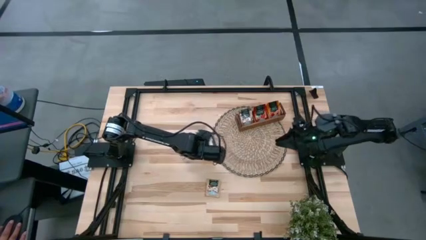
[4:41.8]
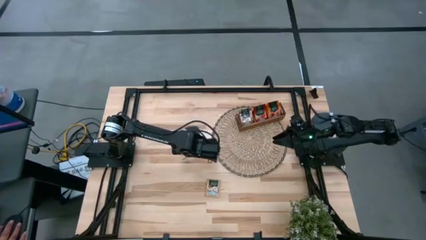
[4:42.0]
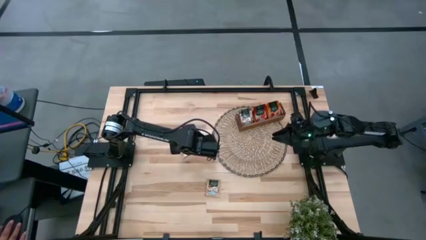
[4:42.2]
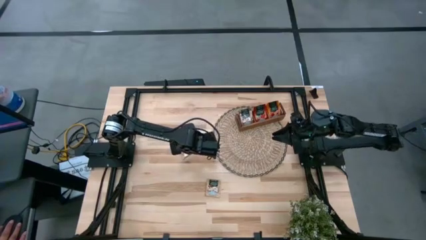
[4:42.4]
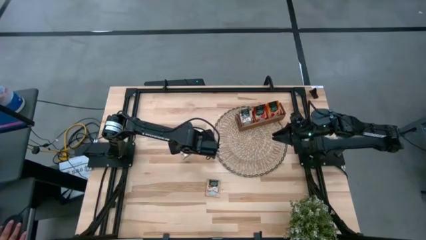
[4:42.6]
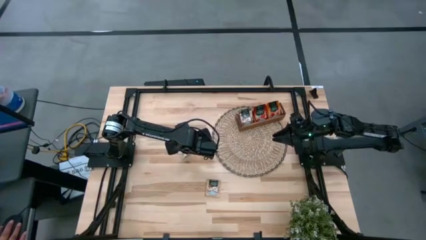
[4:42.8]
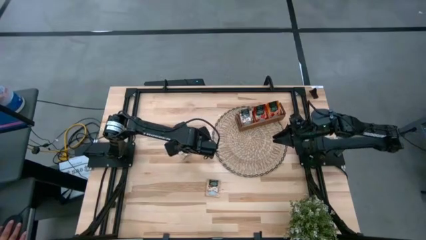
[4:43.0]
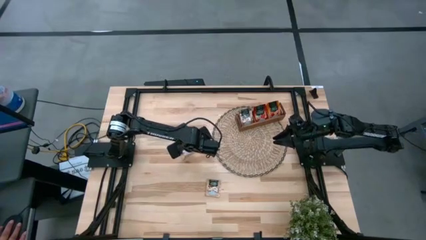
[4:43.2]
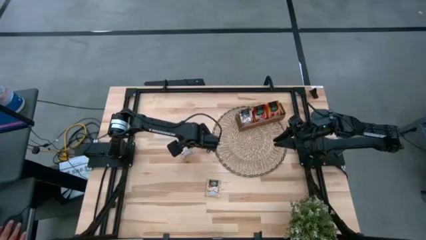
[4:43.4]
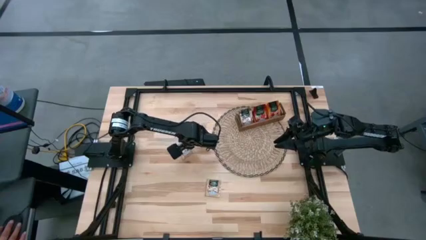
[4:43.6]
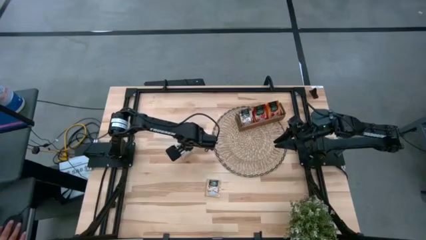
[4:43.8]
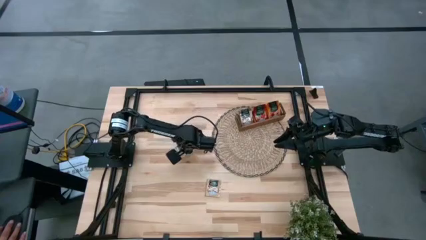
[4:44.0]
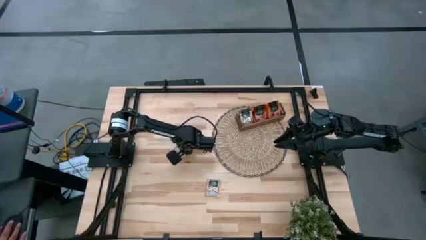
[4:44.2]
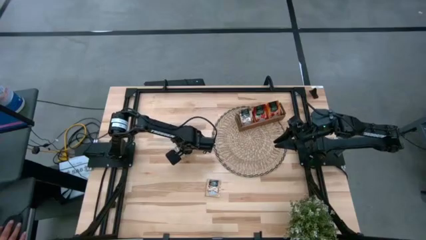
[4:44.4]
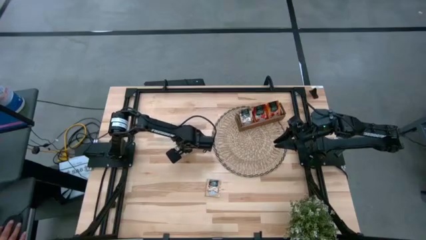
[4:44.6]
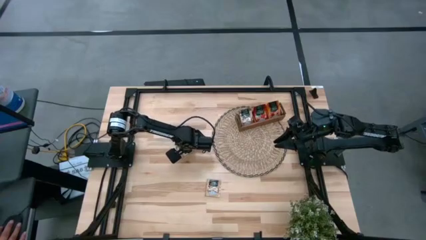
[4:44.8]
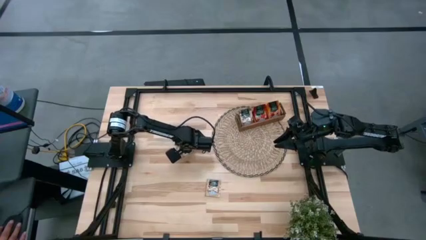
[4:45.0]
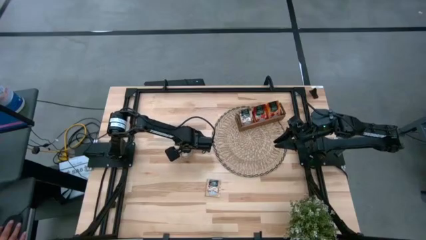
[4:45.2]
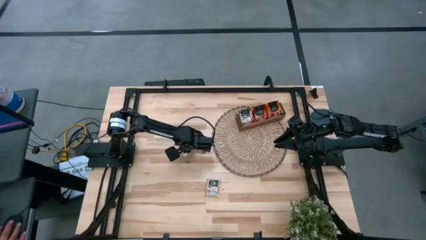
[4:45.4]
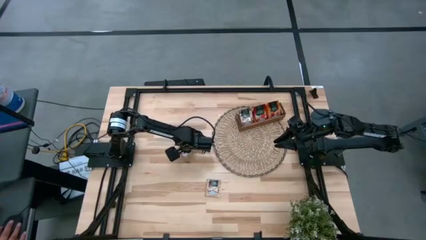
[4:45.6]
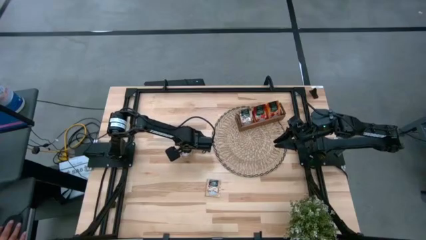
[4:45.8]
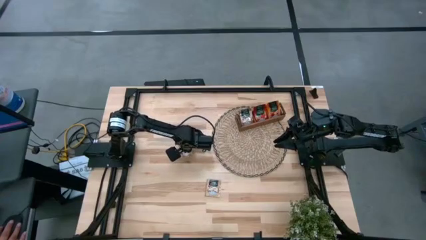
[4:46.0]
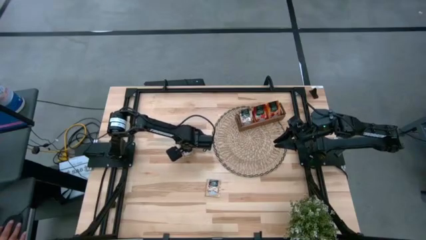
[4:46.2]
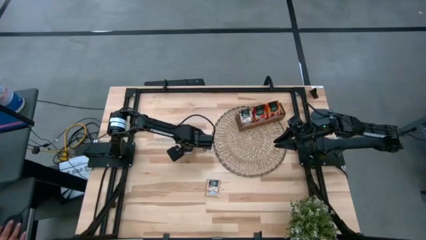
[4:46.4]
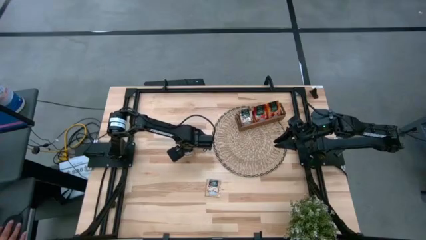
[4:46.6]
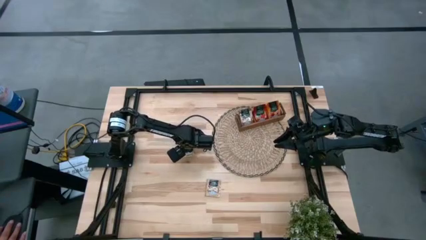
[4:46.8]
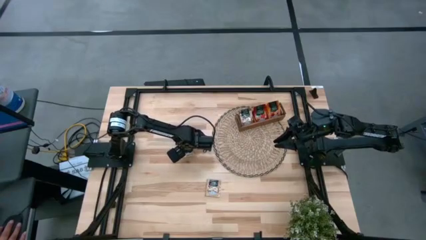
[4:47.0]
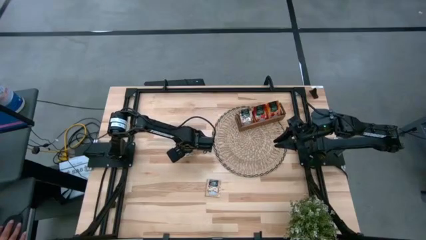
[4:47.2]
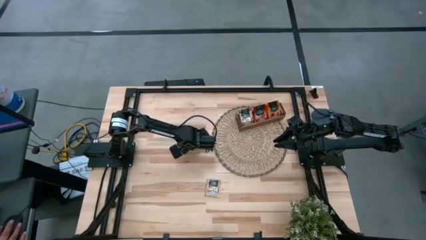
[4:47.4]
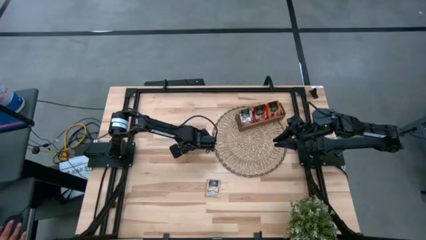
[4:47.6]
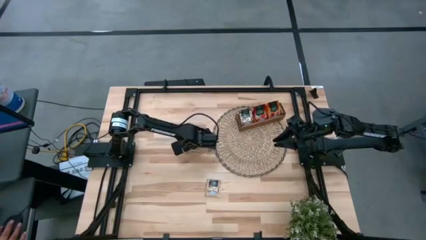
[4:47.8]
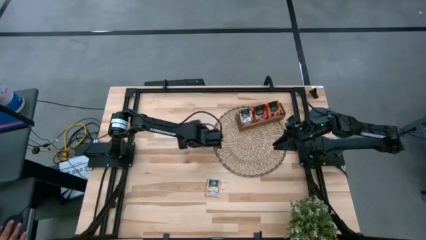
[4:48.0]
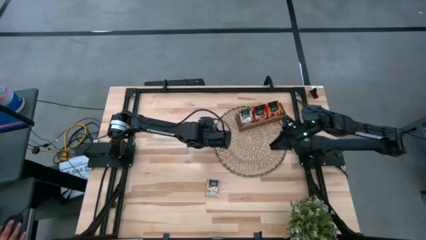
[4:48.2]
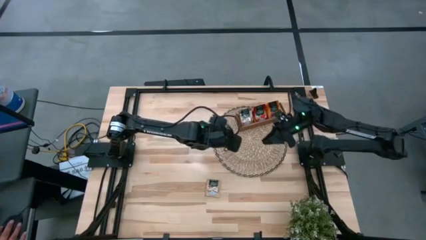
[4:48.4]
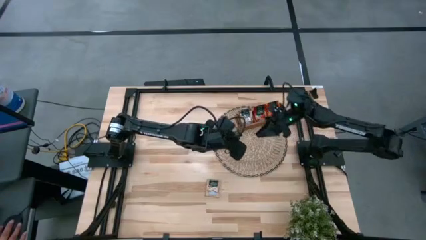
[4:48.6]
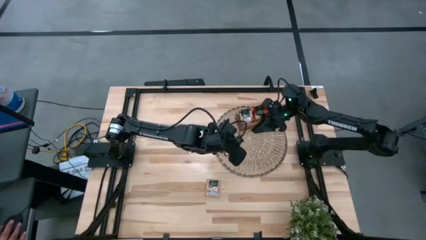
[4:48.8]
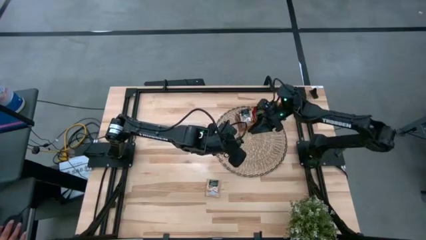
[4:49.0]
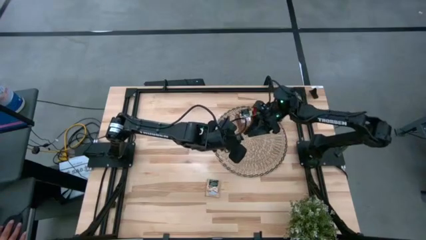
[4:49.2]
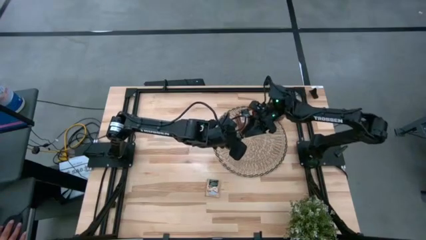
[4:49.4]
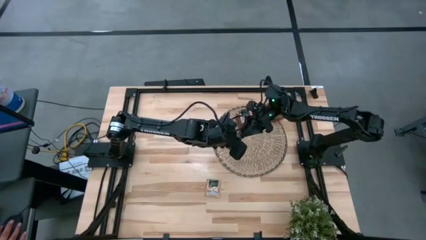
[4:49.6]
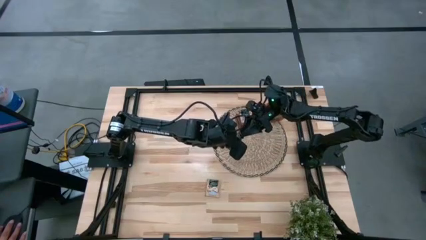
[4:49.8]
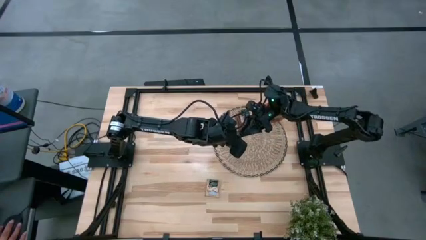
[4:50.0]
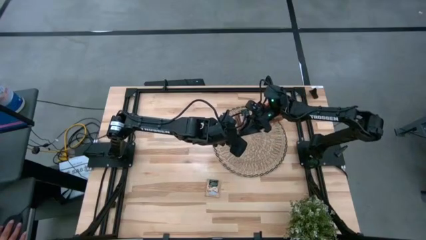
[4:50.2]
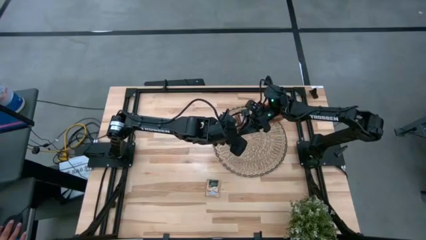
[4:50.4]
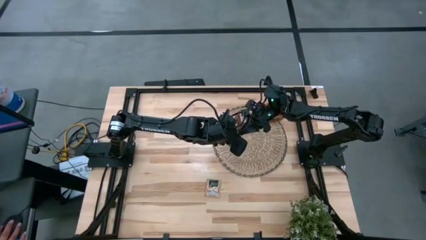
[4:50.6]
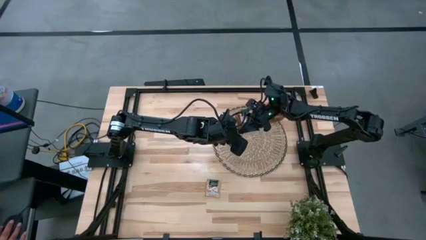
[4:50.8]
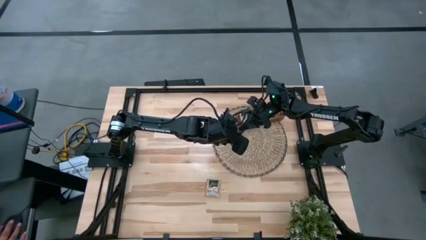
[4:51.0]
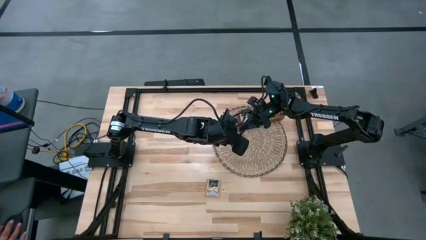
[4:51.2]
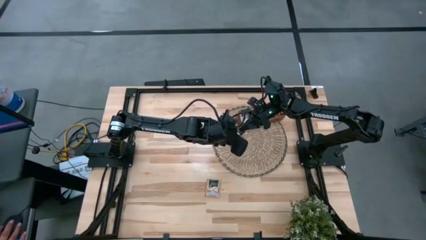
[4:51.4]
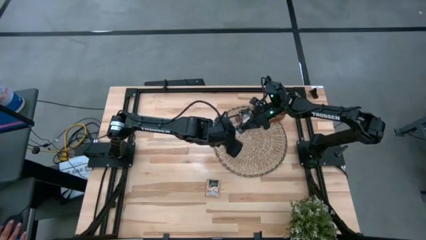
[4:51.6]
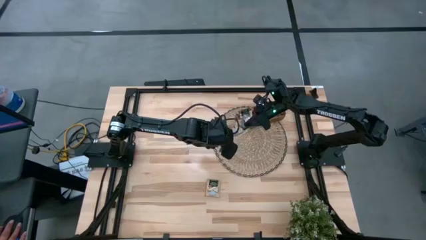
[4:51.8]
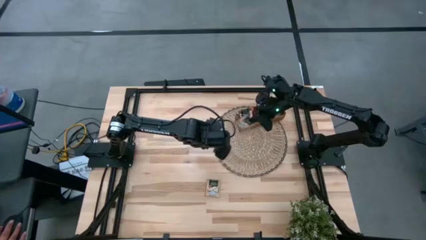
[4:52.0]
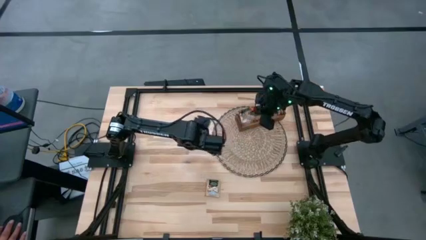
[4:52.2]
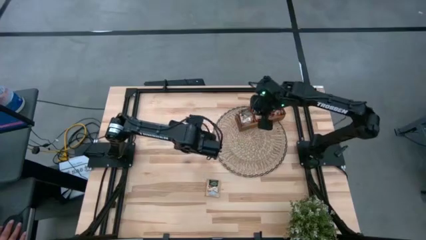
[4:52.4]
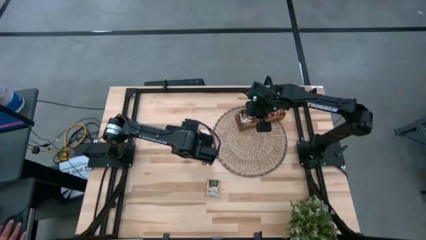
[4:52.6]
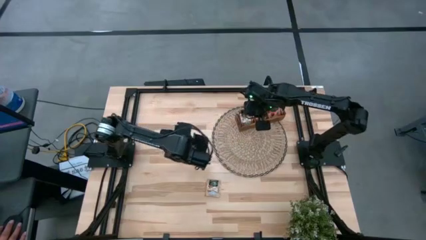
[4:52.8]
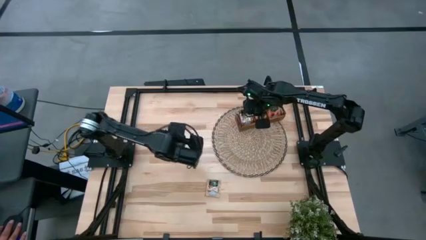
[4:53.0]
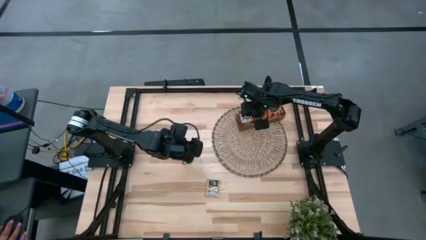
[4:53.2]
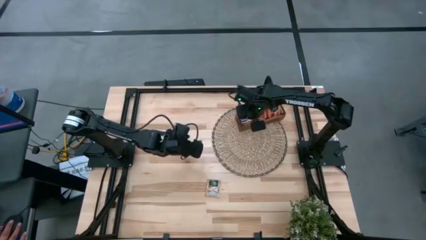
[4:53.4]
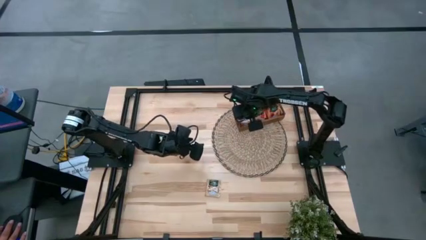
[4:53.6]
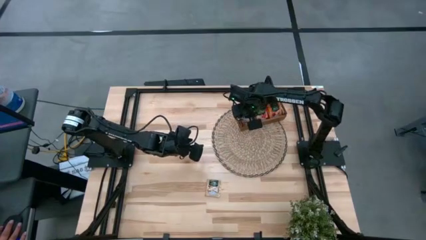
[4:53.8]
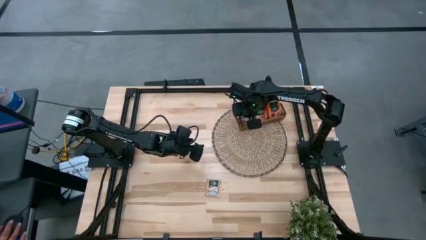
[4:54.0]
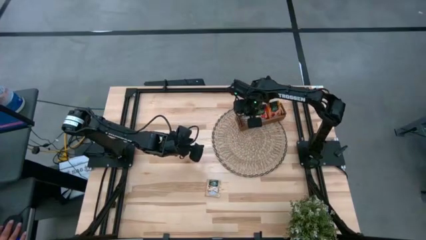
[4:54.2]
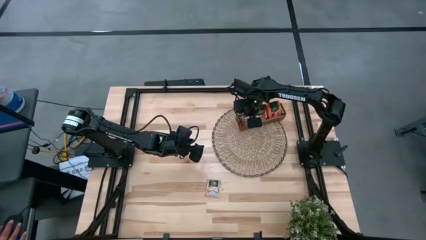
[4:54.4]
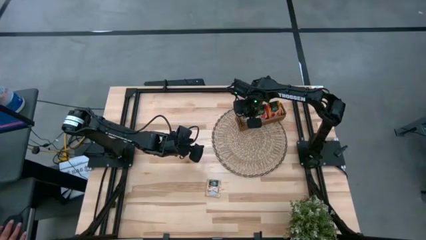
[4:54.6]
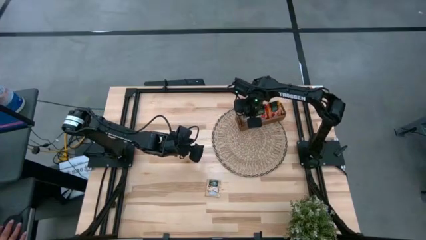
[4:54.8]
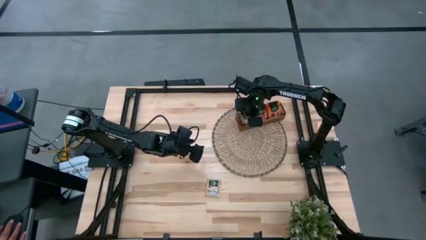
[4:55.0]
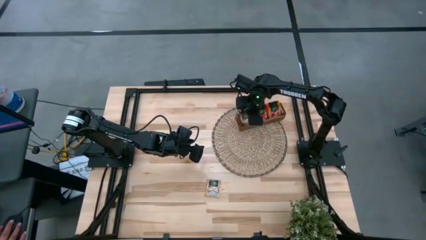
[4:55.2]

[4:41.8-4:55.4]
Task: Pick & Place Tea
Put the brown tea pack into the left compartment of the brown organizer
